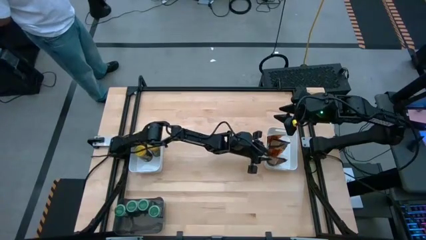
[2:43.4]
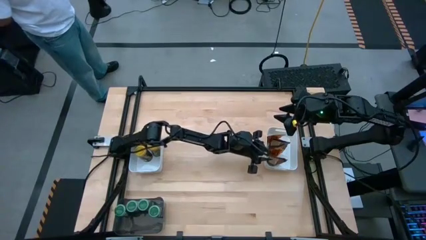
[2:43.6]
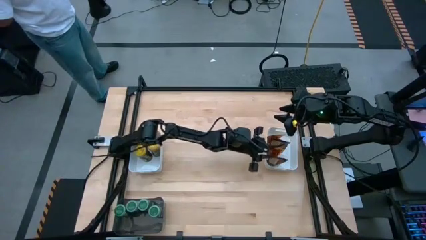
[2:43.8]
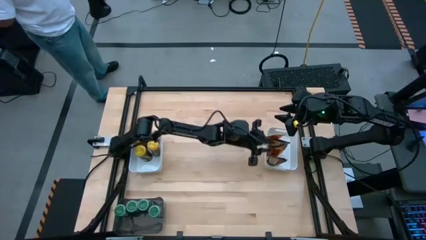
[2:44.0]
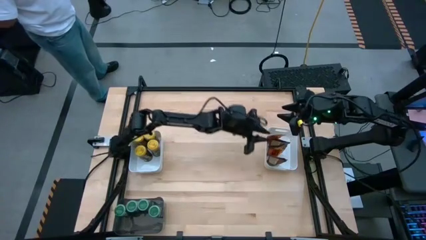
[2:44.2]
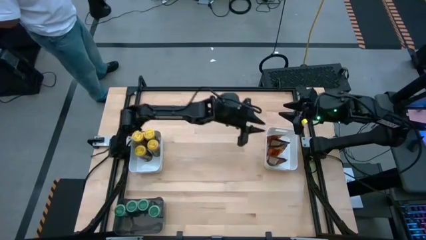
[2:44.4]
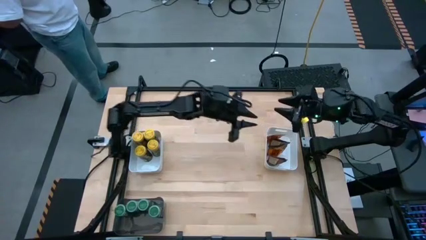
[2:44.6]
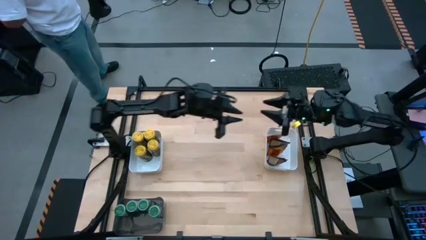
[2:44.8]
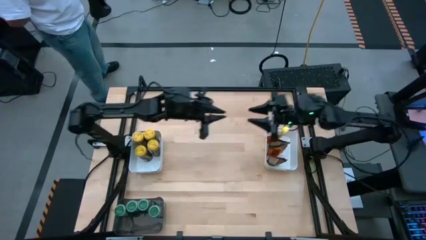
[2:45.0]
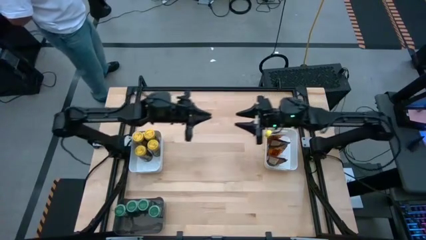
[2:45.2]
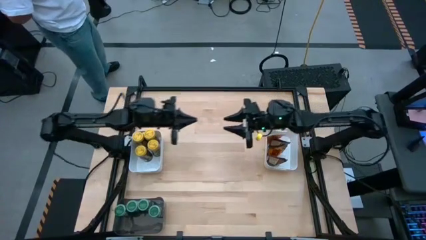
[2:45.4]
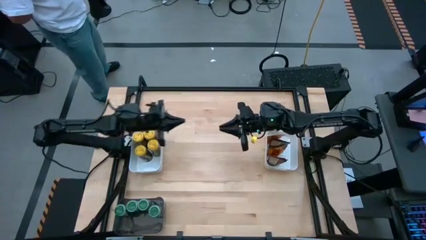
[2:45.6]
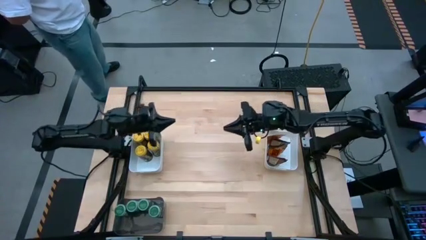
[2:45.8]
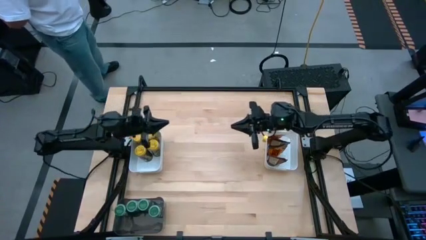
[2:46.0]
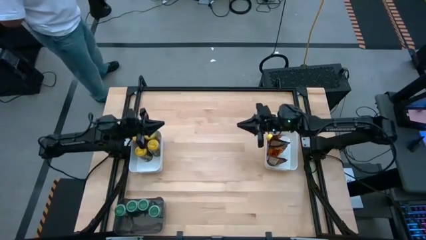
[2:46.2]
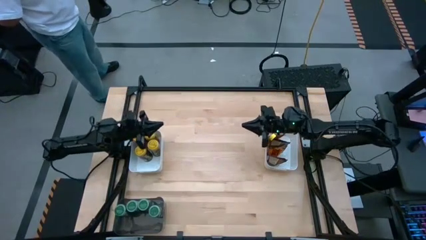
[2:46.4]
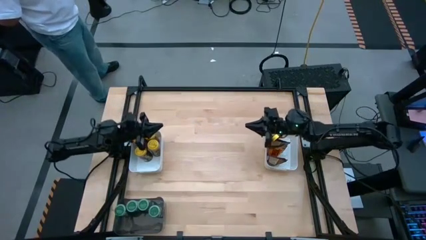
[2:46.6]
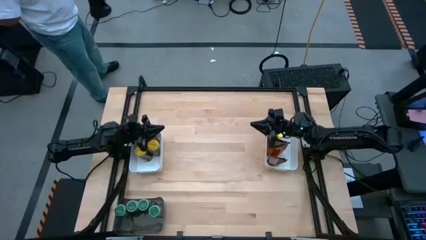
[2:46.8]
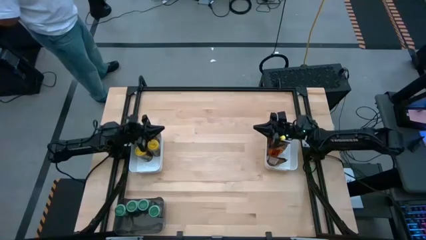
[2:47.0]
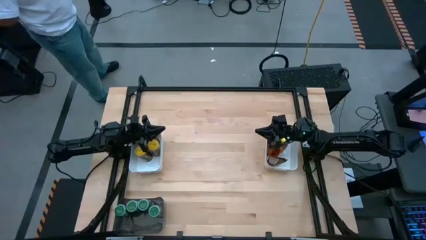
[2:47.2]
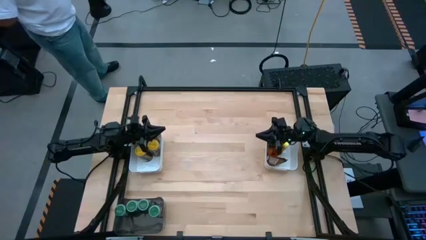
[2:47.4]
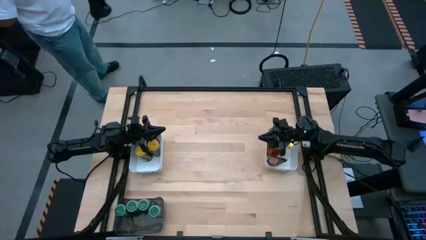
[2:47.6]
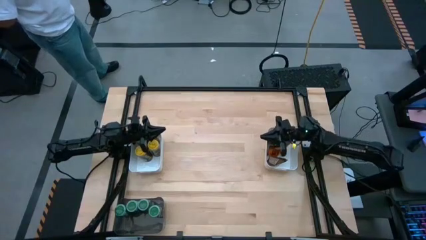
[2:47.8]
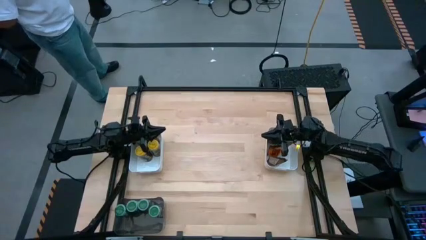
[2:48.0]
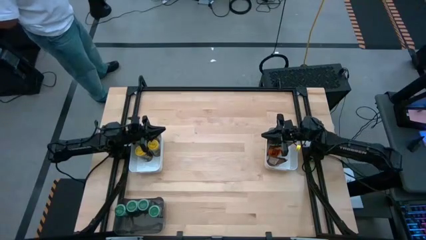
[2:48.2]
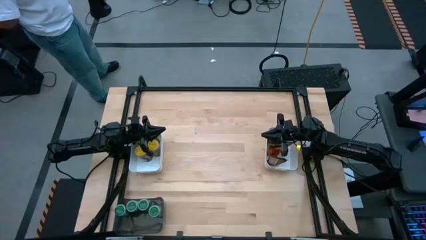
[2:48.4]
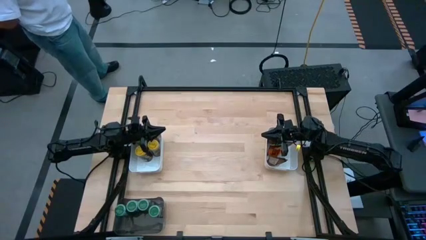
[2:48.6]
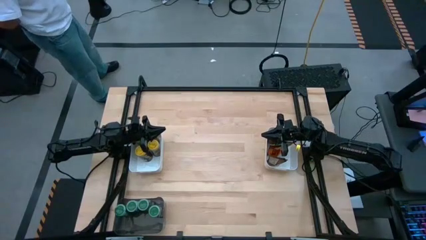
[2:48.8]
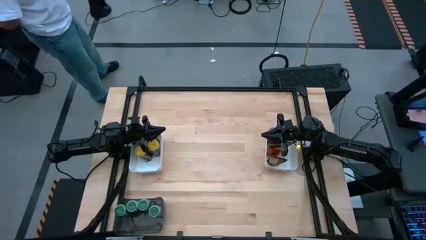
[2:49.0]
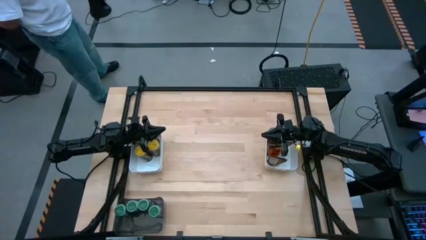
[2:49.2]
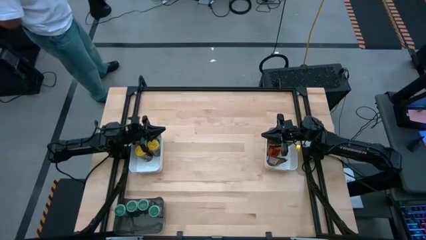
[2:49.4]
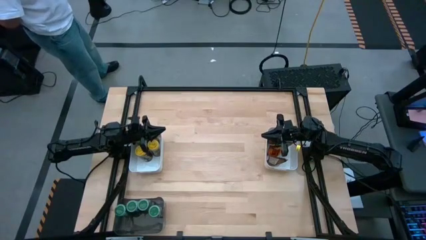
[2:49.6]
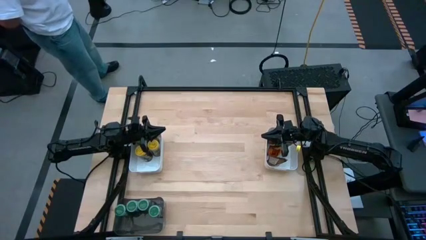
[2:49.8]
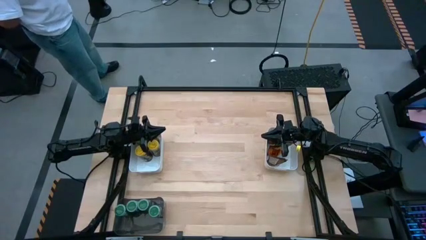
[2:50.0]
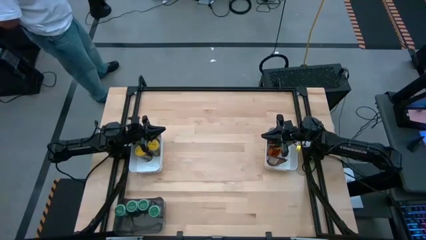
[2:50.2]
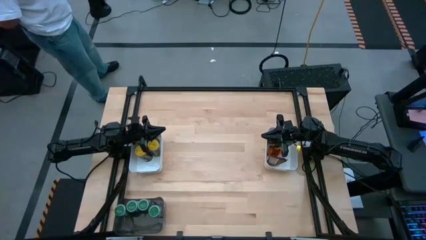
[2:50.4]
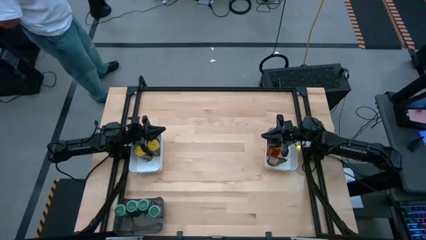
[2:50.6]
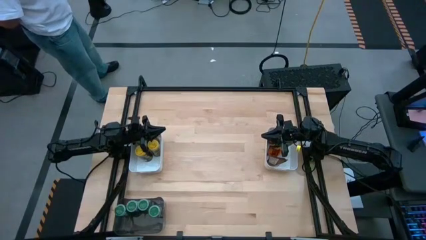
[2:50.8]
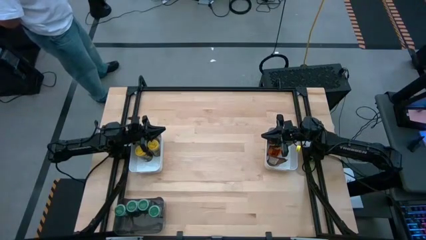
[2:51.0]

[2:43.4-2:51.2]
Task: Sort spices by type
Return to Home Position

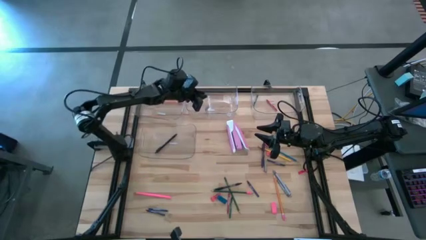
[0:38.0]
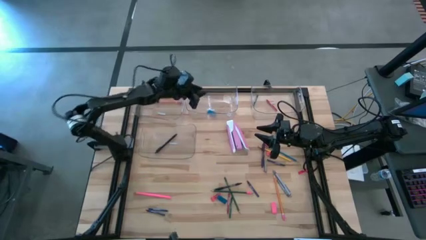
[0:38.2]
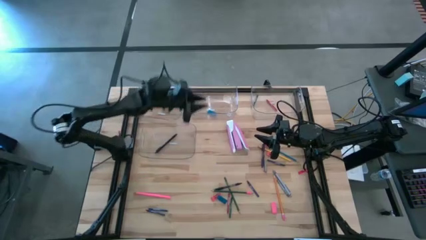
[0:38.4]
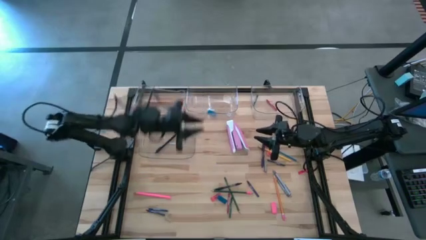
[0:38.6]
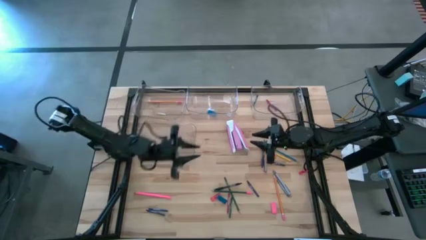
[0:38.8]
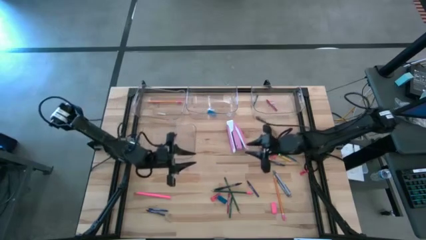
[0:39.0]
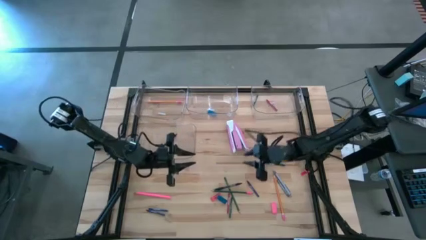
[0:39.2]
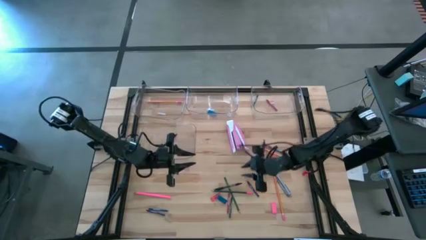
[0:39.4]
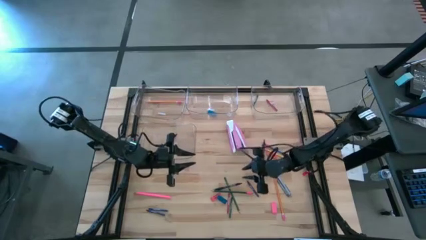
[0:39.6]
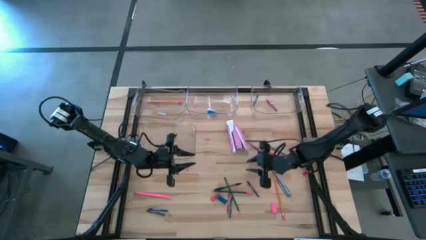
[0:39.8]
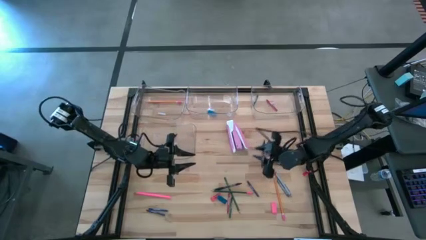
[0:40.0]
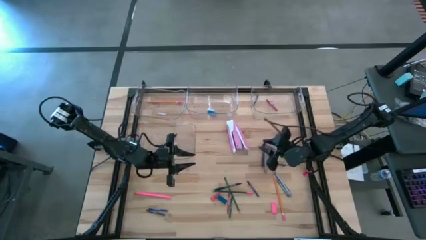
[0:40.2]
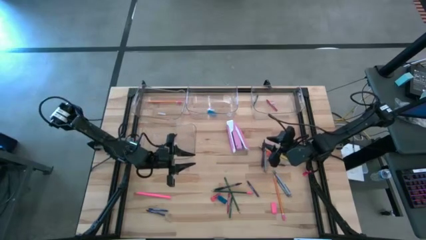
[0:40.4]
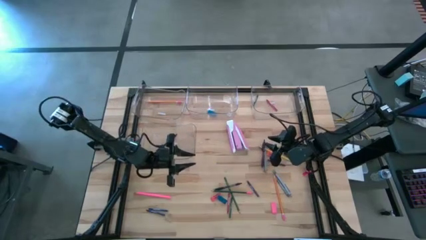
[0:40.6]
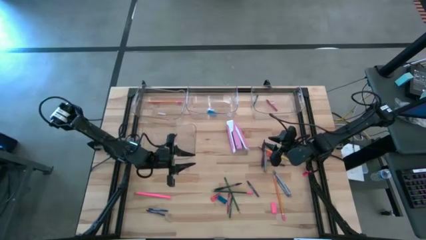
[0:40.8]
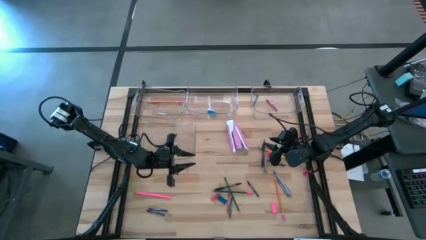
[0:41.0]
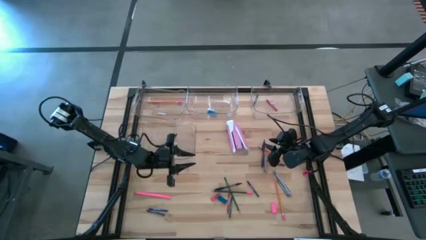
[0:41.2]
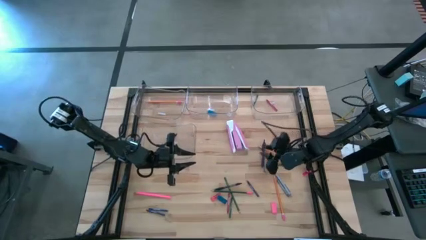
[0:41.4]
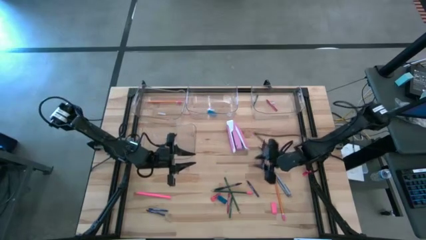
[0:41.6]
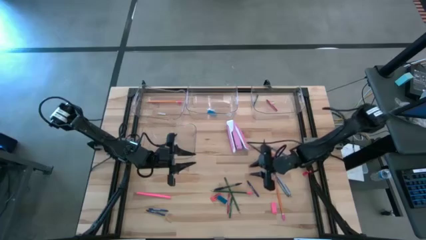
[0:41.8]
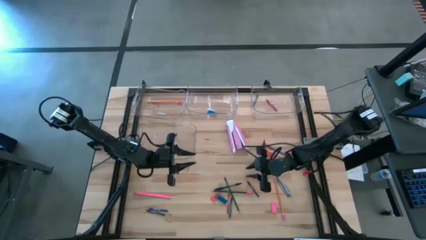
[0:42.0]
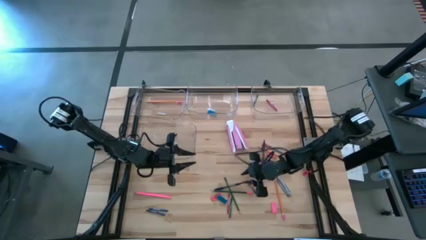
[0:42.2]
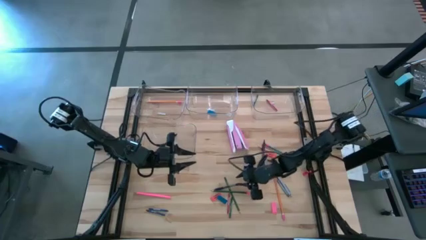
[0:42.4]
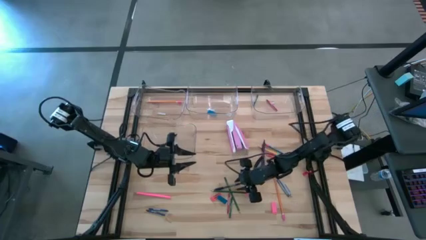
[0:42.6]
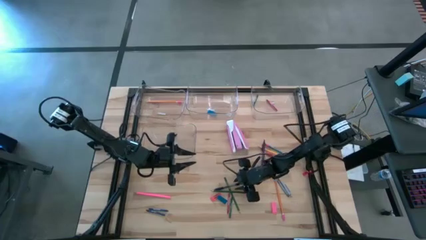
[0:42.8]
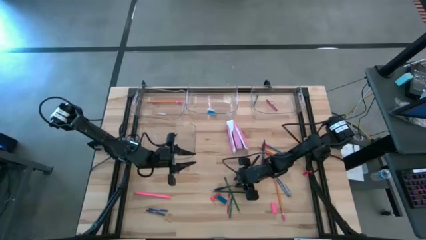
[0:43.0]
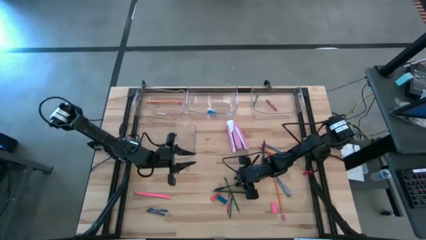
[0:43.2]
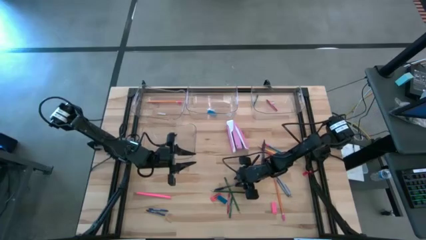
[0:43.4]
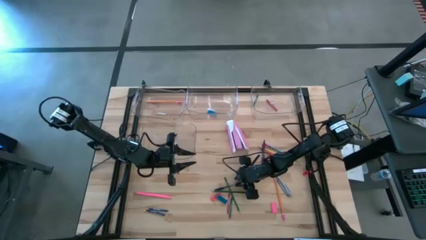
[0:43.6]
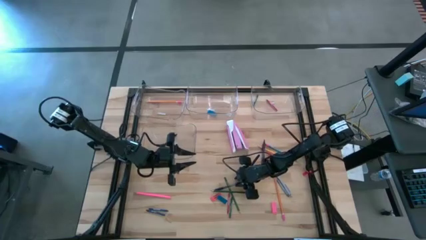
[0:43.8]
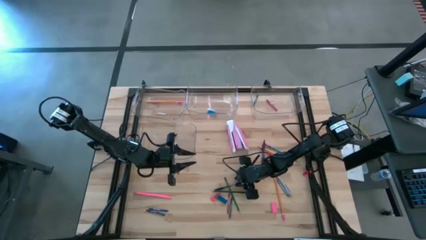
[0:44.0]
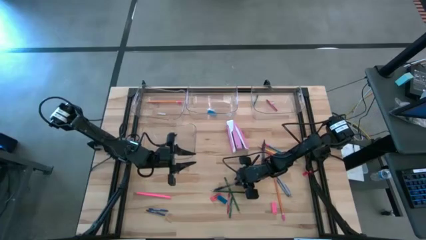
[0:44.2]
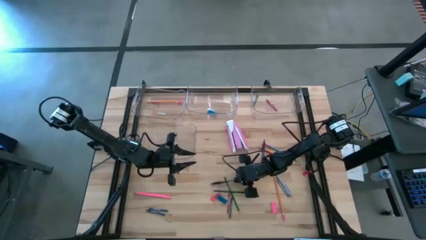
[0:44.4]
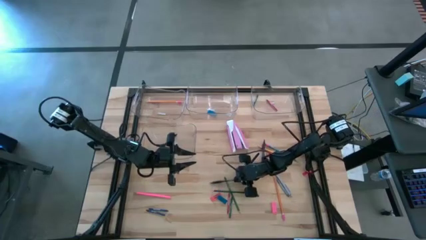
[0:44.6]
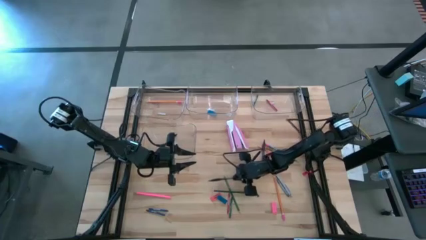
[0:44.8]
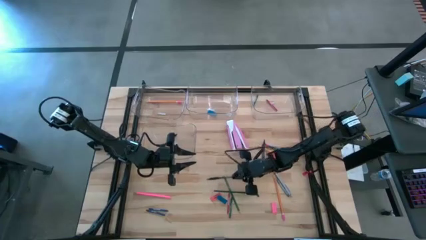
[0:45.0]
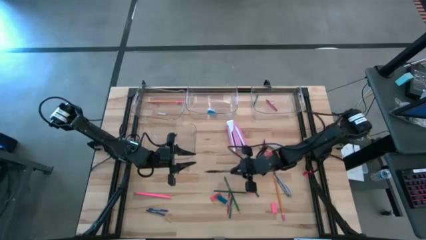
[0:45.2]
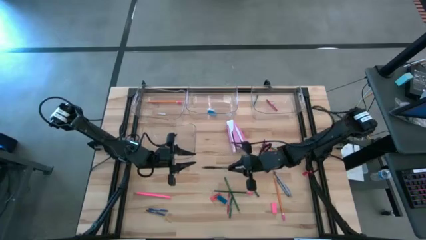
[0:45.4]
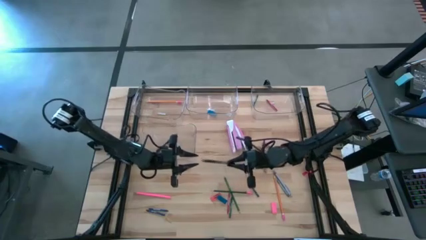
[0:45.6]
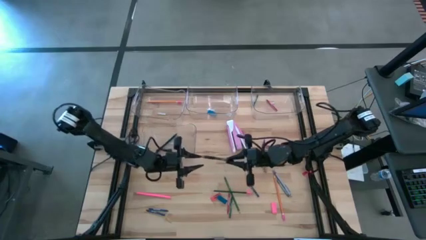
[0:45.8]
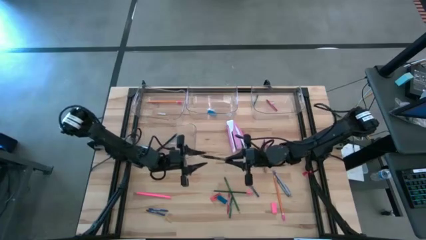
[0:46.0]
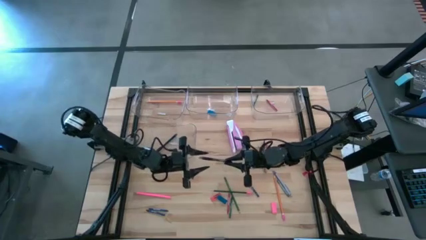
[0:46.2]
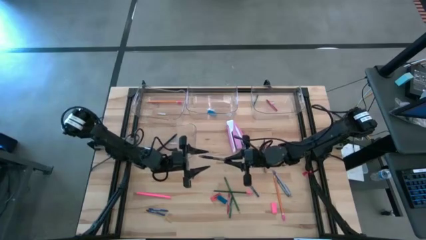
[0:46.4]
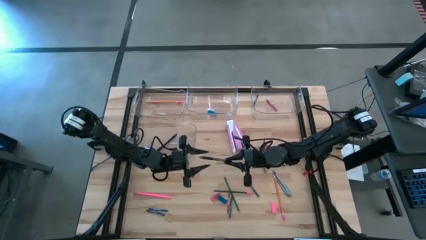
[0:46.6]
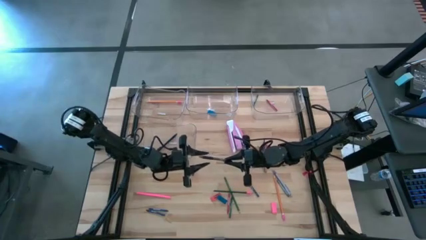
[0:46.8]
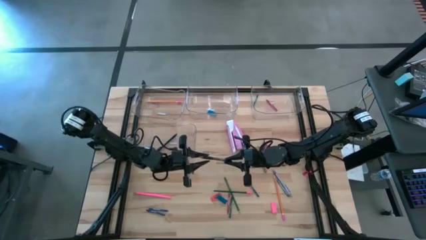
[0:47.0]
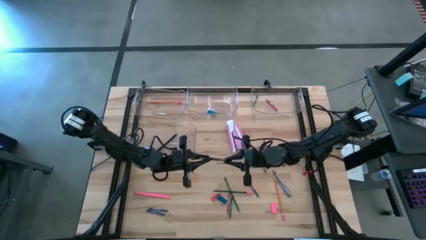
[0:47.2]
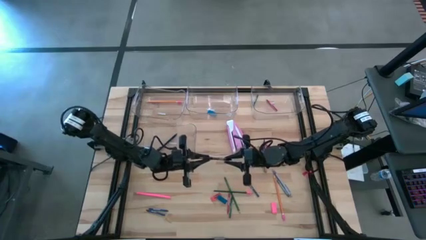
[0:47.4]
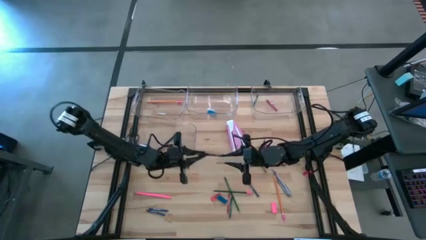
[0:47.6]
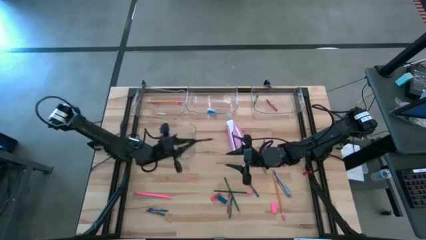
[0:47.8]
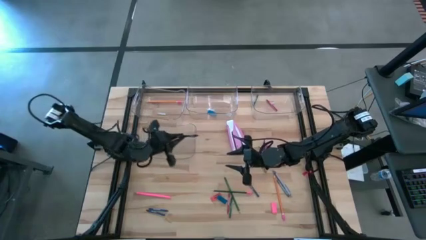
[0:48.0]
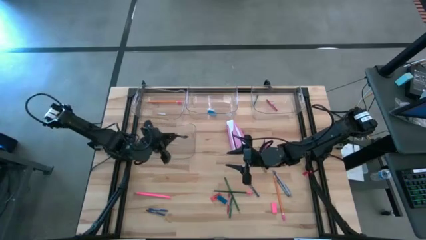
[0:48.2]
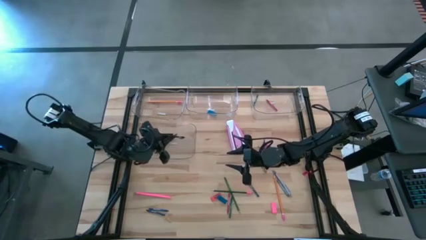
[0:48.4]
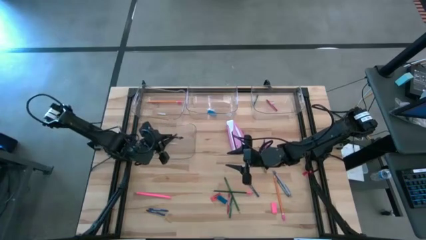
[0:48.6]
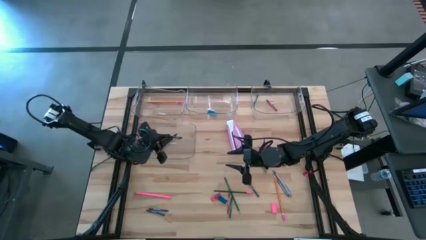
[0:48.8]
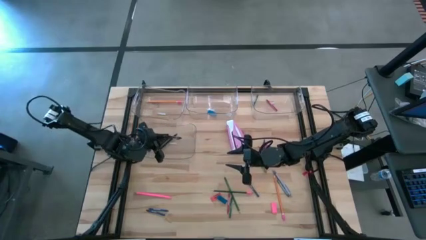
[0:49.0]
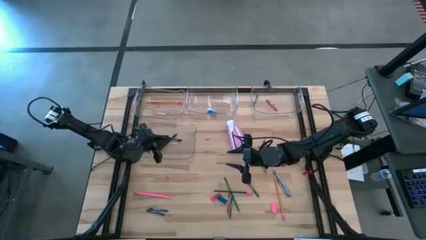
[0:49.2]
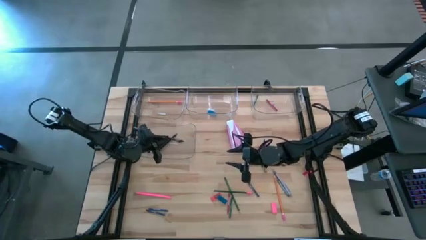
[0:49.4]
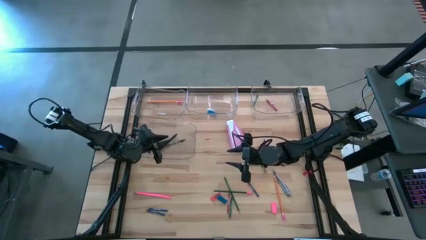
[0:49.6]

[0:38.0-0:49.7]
Task: Sort crayons/erasers/pens/pencils in bins
Put the black pen into the bottom left transparent bin
